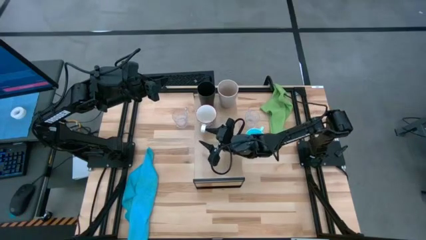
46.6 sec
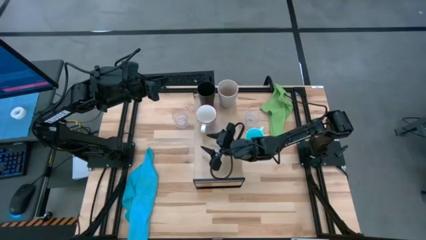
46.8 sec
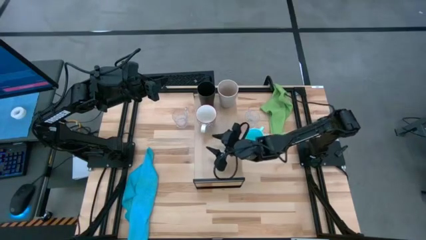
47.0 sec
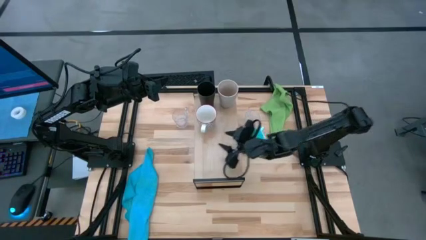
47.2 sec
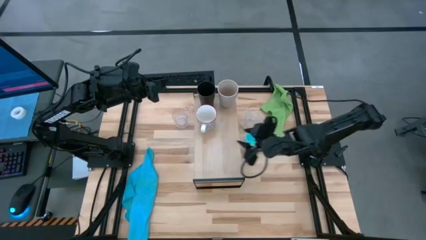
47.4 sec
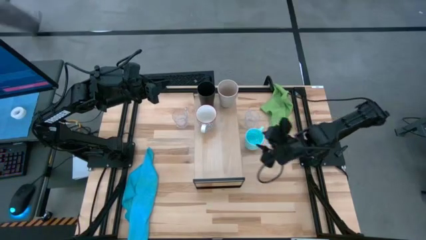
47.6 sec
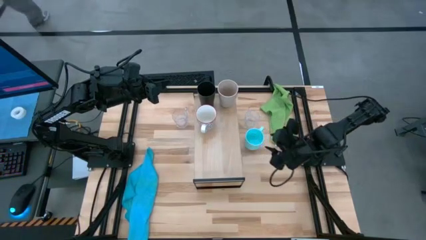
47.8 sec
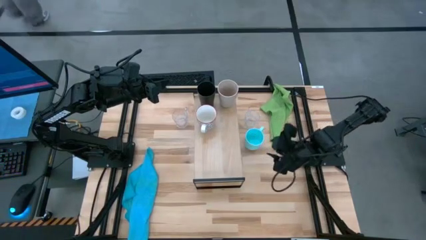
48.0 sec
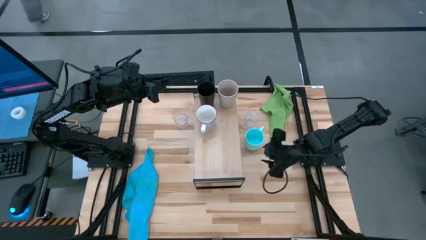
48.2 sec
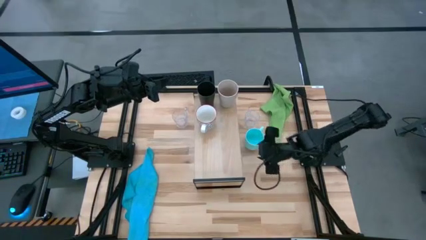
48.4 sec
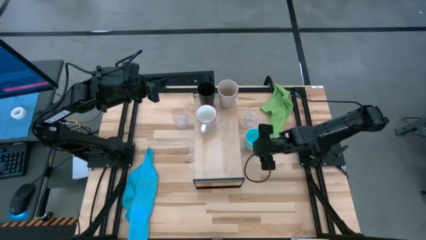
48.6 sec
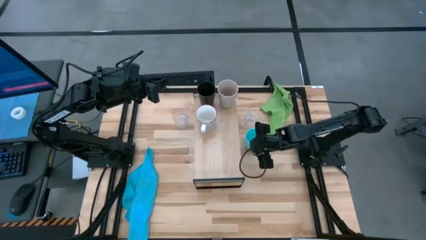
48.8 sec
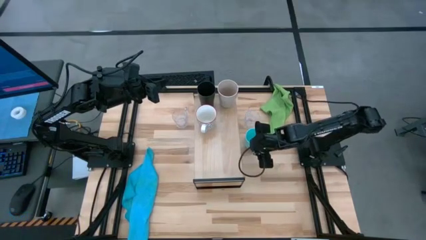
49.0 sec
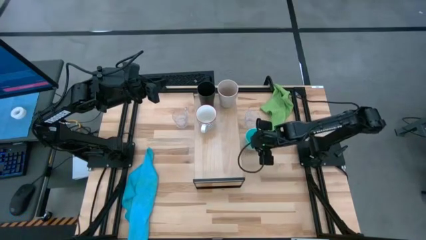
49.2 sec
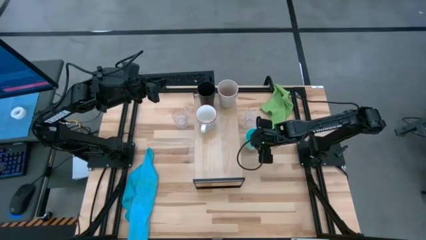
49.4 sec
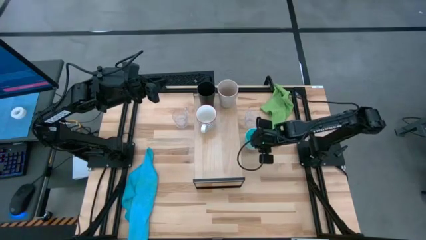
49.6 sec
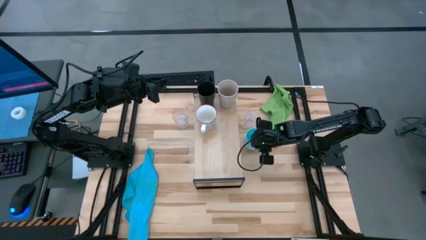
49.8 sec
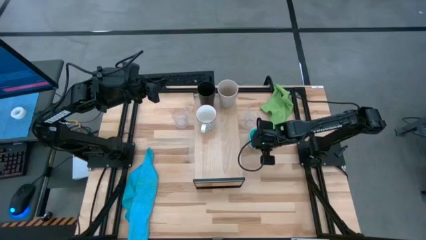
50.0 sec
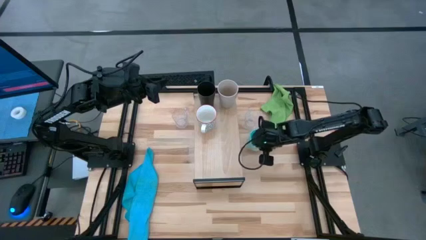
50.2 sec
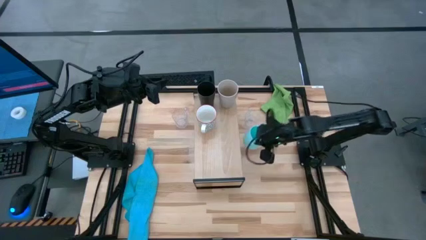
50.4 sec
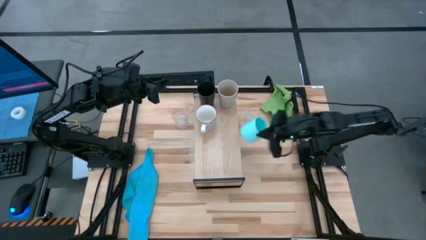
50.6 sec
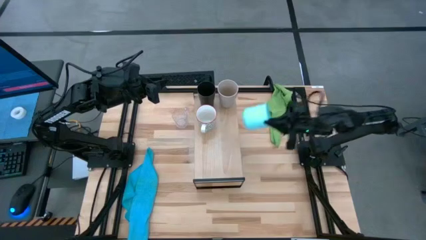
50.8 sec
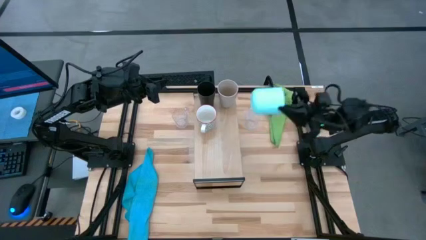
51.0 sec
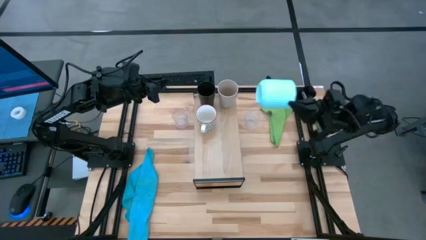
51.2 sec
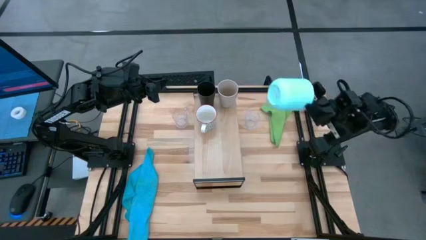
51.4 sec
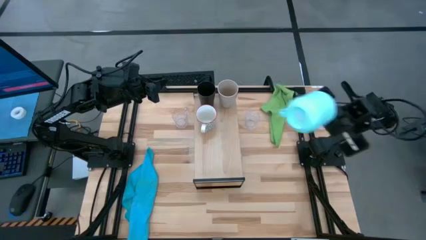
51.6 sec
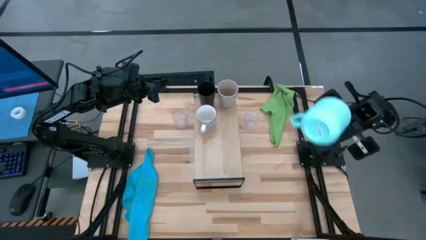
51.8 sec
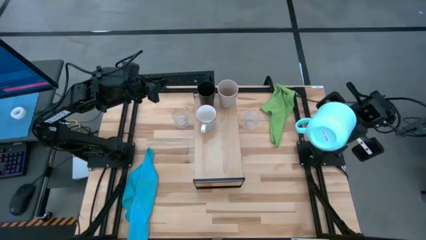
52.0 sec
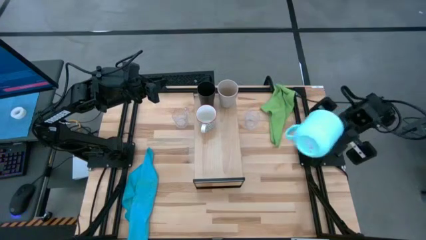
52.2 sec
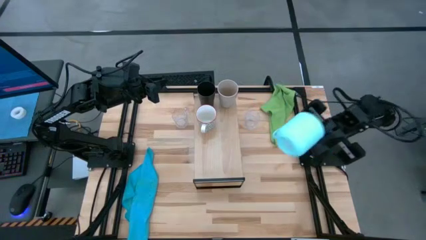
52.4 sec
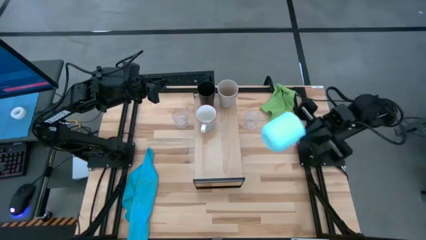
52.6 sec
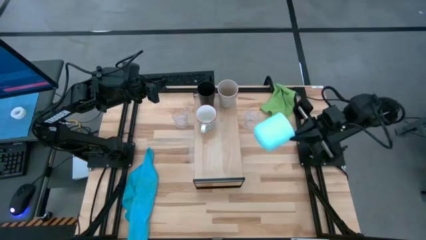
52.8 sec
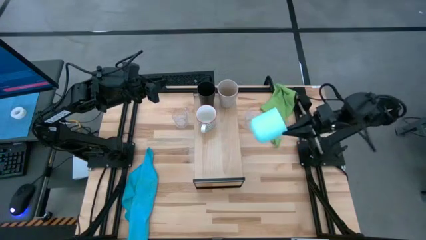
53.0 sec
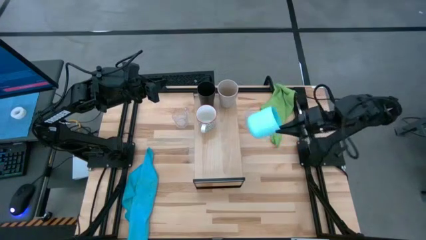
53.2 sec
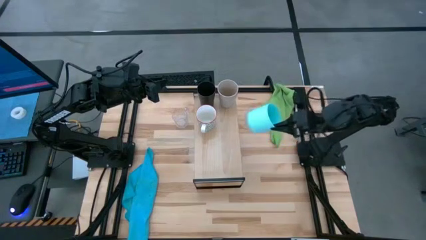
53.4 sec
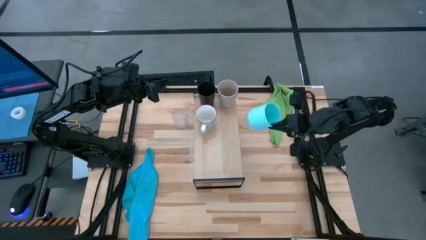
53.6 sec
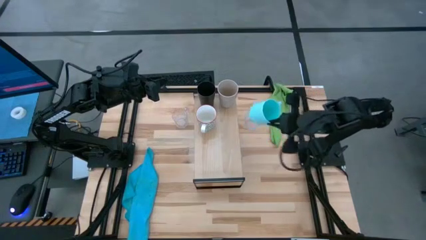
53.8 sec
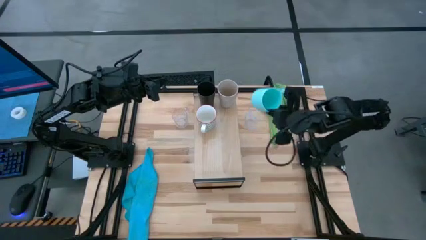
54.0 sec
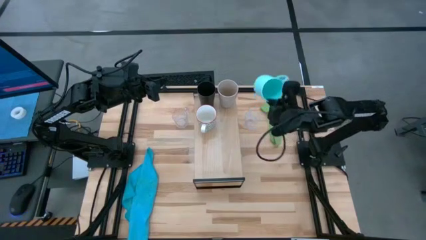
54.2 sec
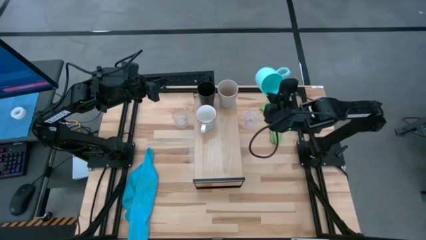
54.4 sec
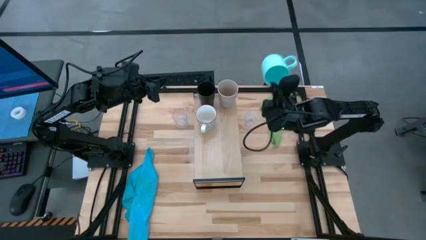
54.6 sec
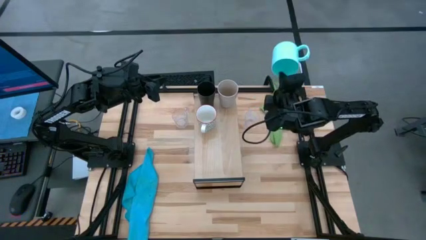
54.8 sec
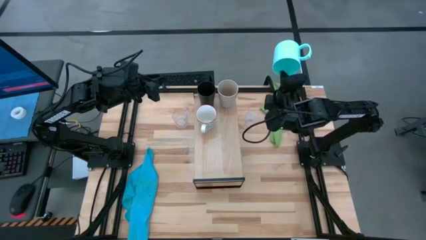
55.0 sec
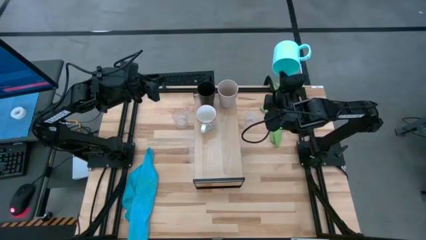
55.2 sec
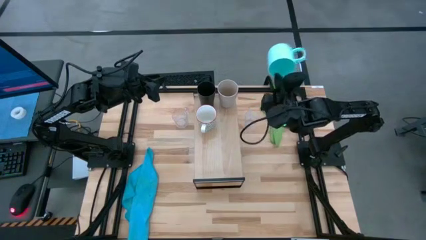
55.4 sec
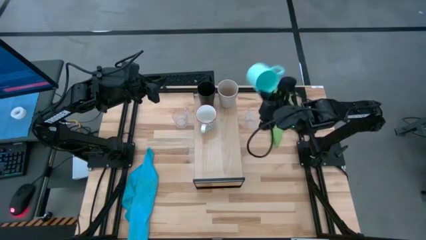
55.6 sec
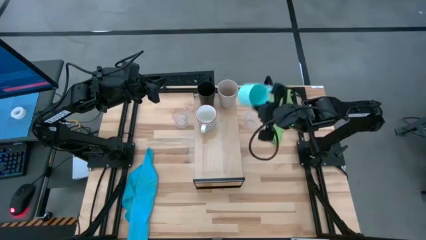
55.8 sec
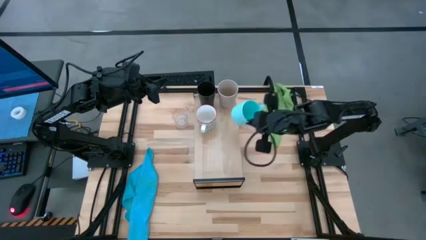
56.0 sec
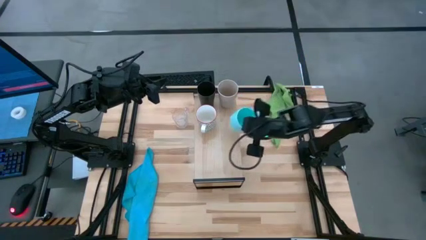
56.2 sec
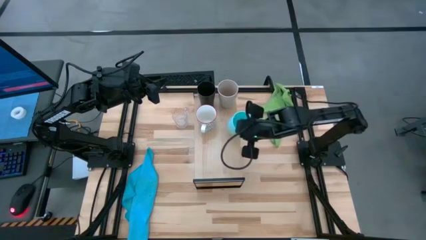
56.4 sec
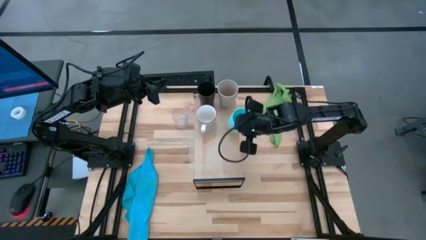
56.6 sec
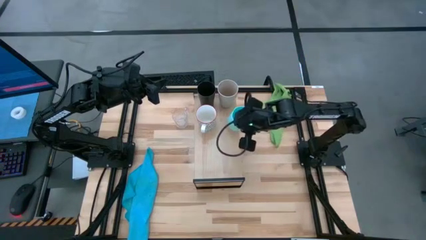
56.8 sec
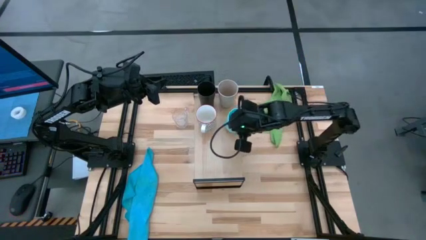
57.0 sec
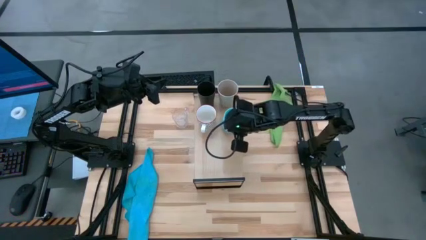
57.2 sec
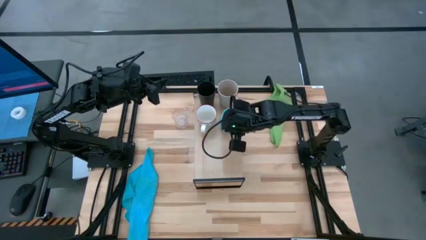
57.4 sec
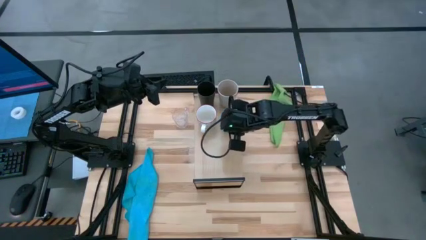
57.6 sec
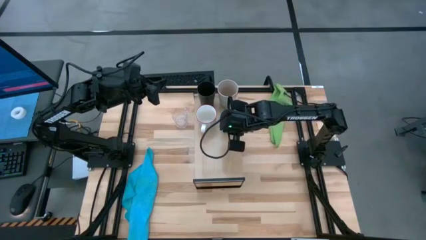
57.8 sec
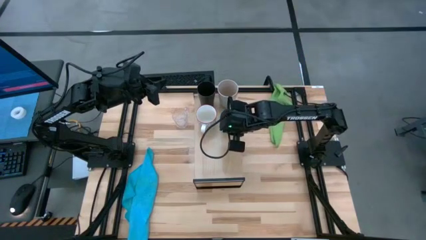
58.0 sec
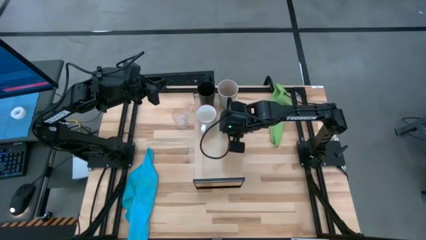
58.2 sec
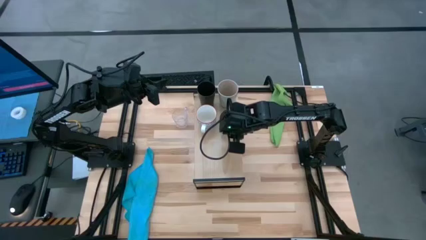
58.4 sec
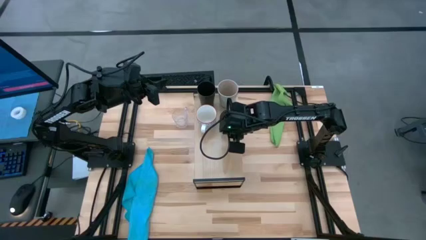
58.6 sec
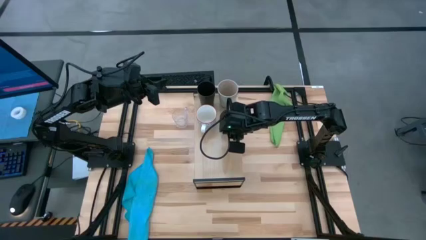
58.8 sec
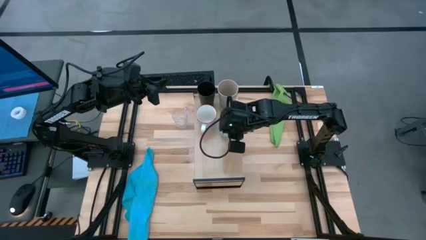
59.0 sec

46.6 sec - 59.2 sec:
Task: Stack small to large cups/mugs on shelf
Put the blue cup on the shelf

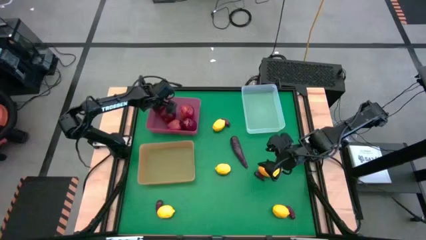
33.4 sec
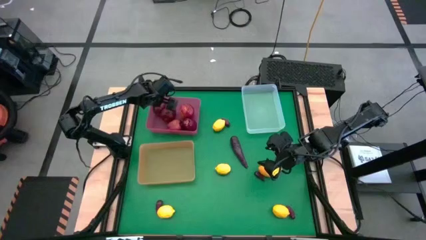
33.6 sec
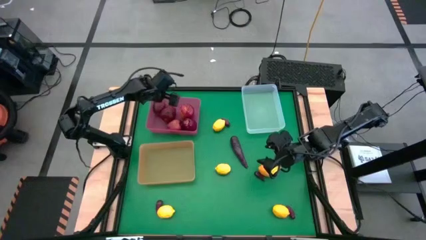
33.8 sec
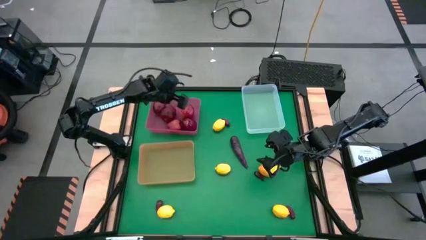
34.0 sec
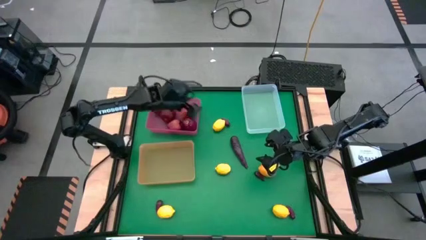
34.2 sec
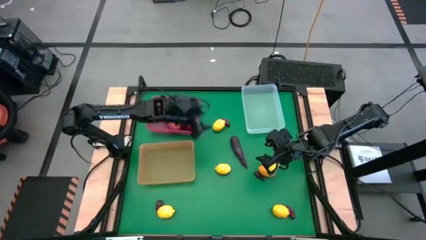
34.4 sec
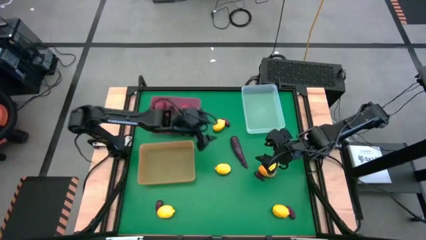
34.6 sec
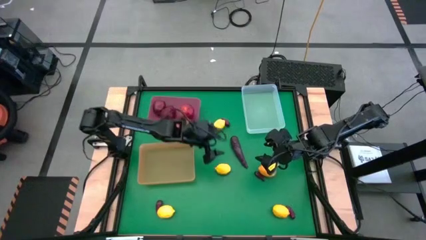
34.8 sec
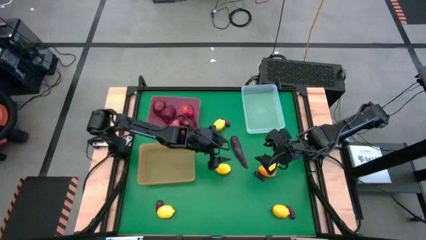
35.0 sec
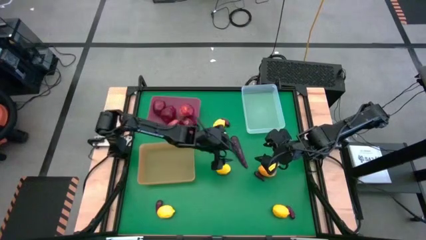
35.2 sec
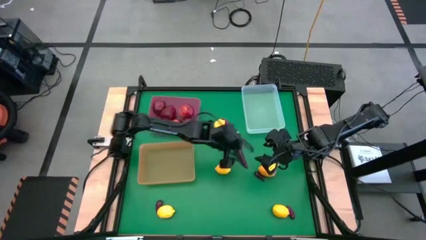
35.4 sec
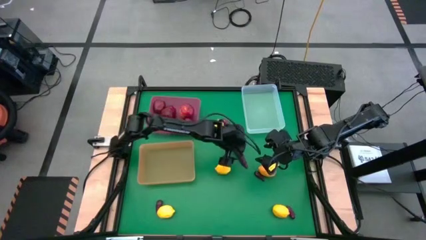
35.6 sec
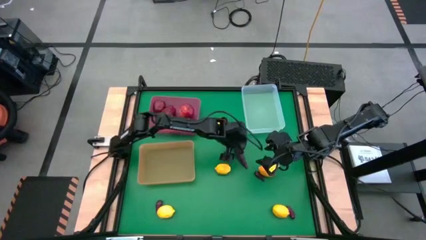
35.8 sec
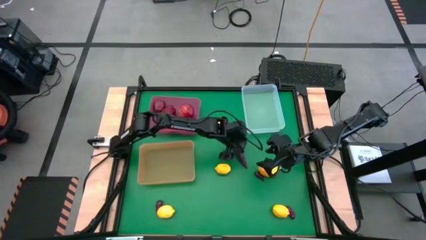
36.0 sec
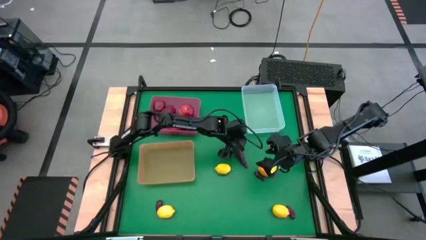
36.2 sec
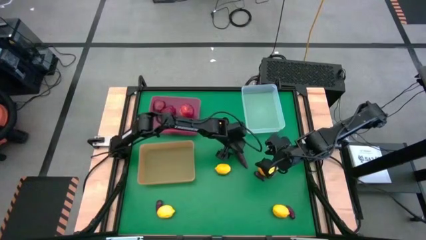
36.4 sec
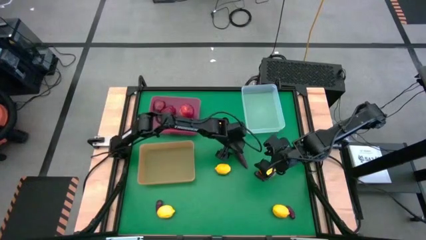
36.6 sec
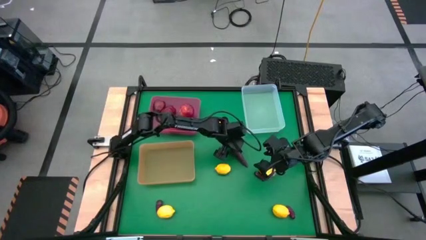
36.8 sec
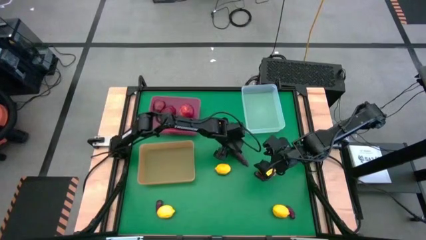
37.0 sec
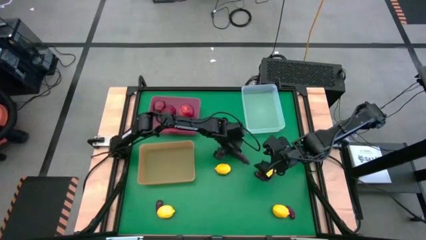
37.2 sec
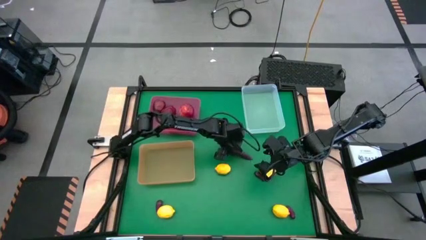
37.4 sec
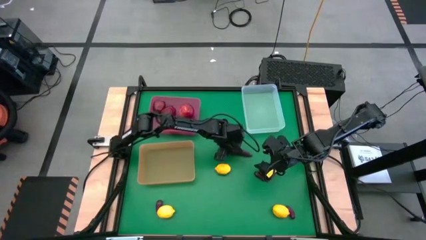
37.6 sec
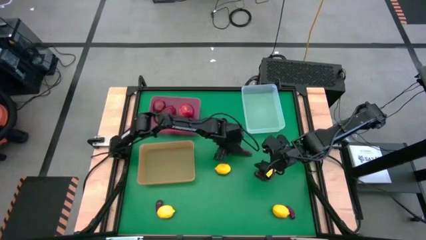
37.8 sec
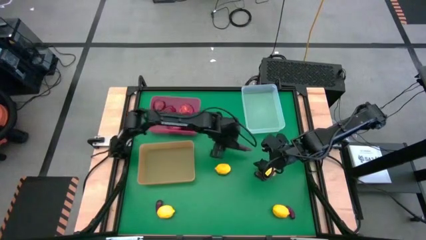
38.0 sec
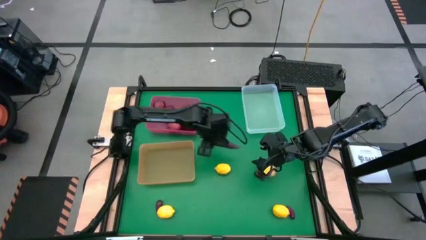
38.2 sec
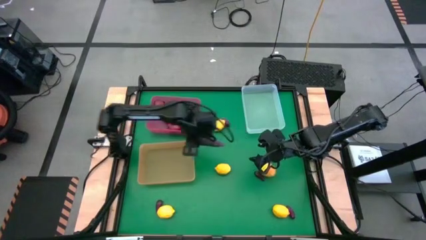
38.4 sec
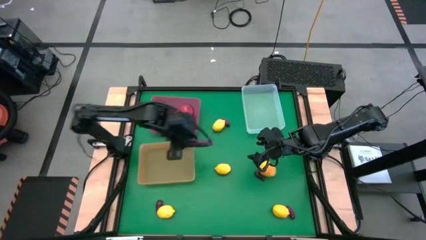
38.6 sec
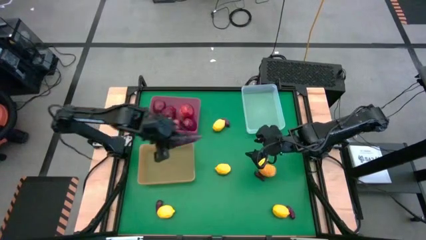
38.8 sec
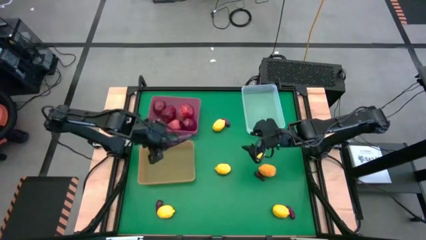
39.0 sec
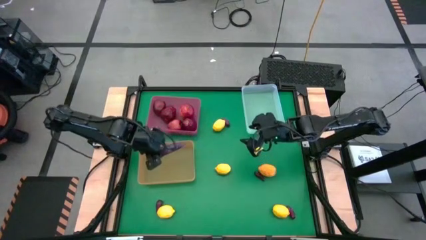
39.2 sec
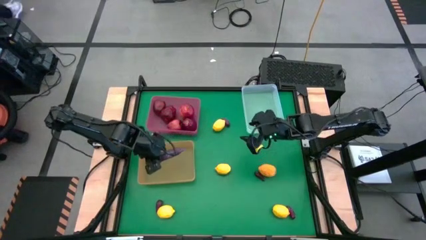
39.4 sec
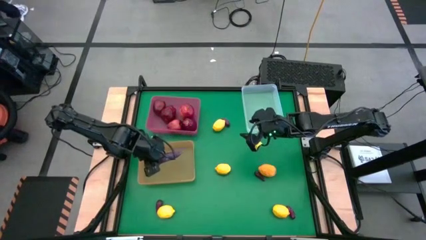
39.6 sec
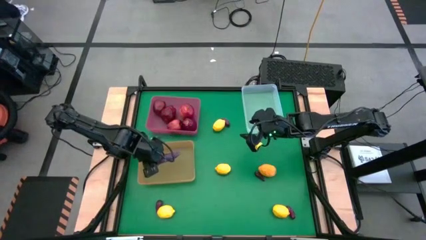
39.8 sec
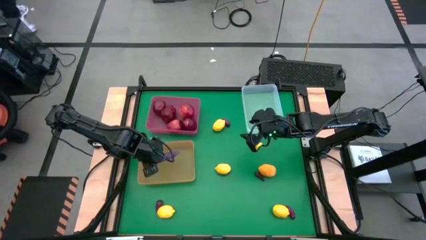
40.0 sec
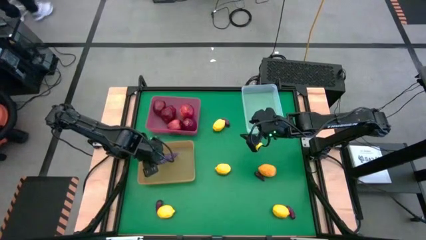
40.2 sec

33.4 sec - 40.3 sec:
Task: Sort produce into baskets
Put the eggplant into the orange bin
